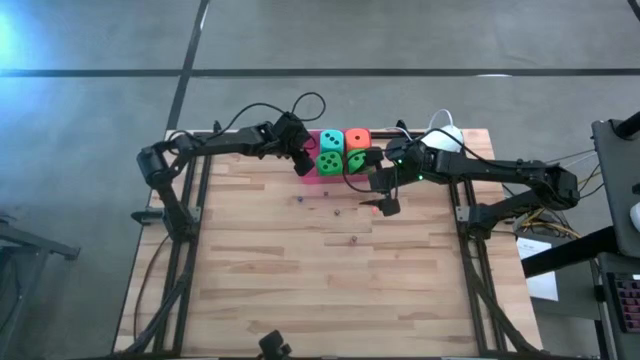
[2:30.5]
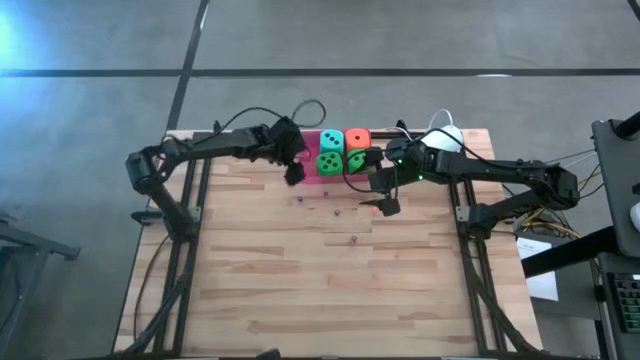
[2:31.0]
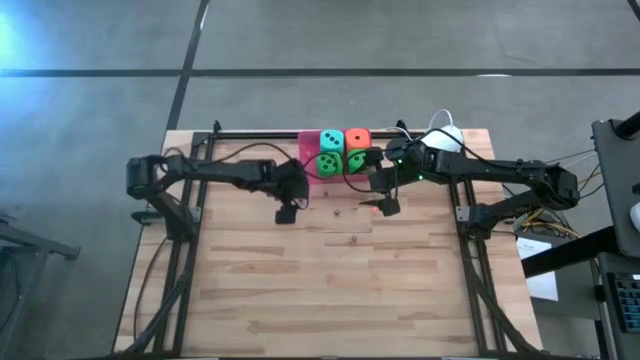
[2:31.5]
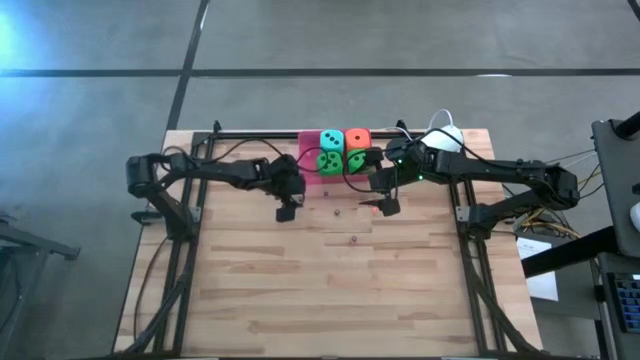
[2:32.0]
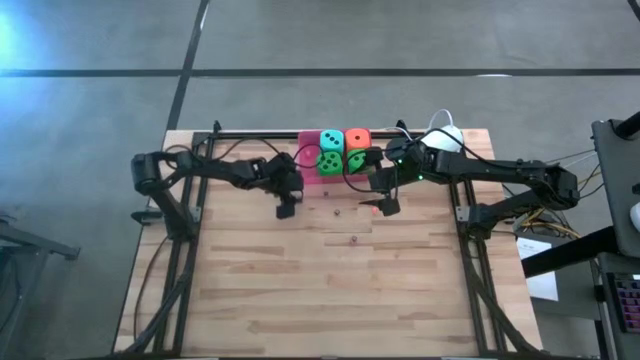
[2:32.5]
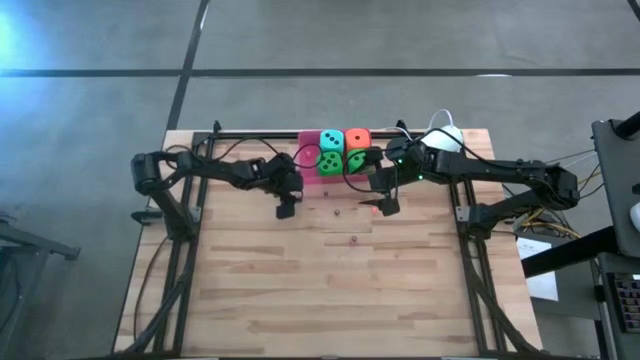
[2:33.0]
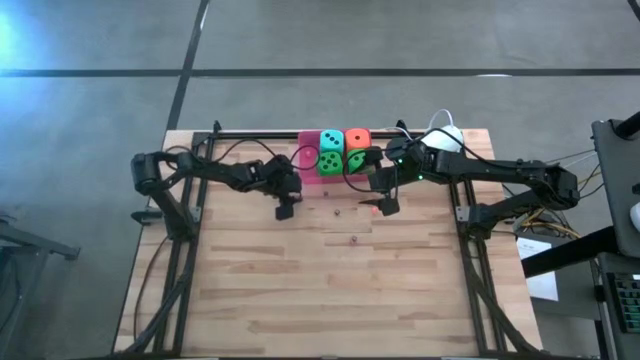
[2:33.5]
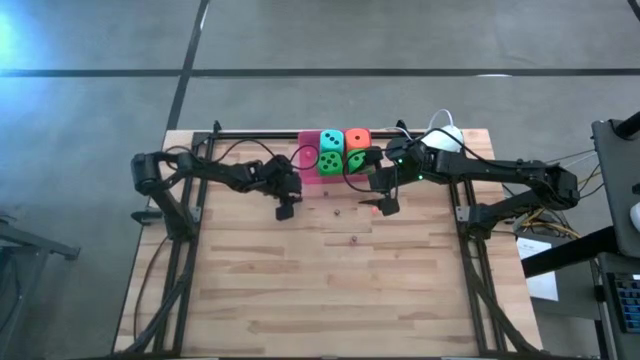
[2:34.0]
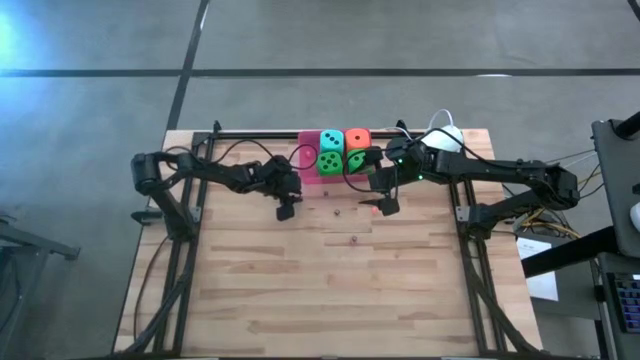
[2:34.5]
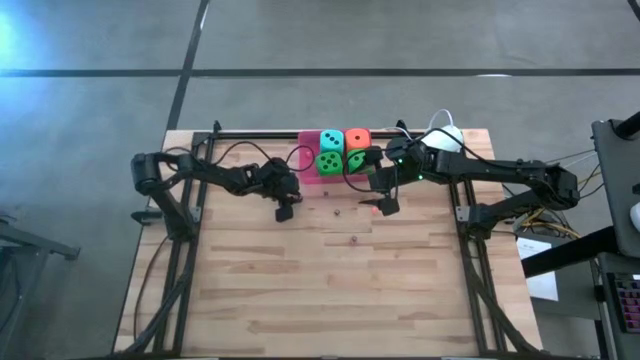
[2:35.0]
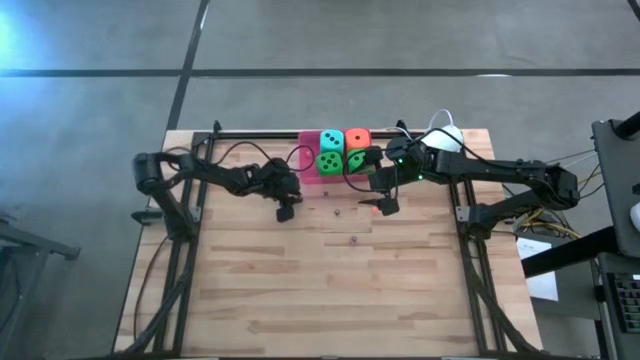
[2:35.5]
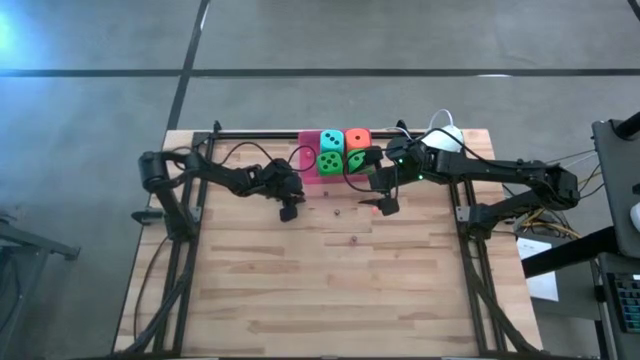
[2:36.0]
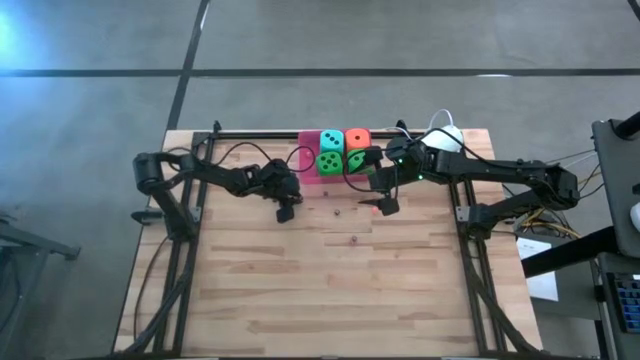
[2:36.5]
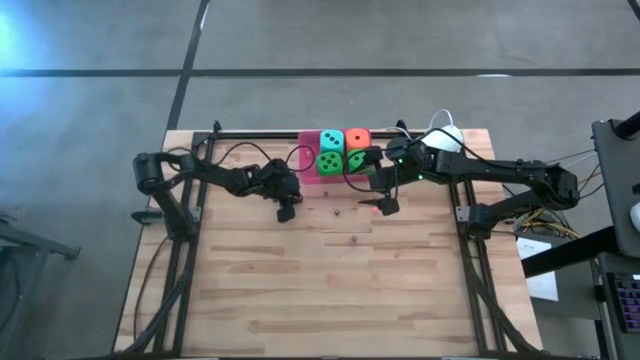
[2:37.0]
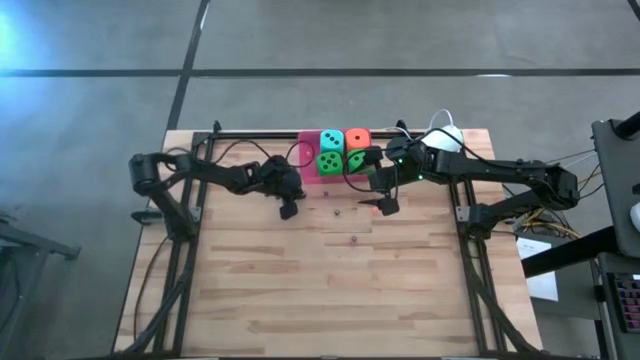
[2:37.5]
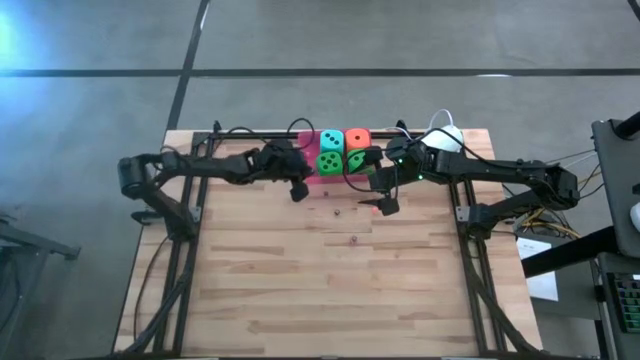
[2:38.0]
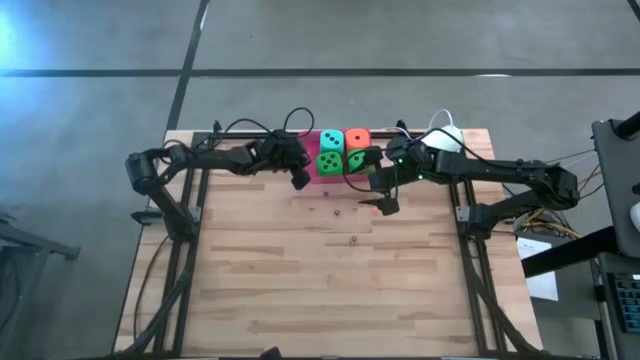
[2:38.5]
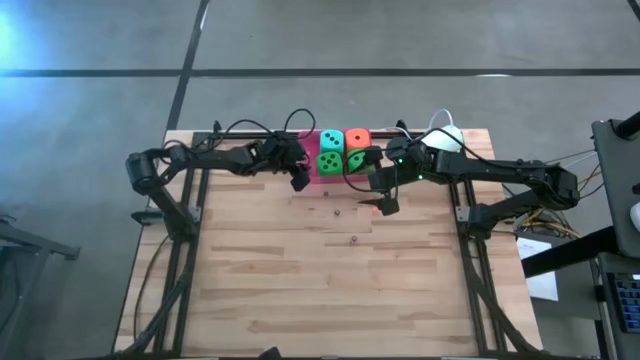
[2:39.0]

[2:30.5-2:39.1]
Task: Pick & Place Dice
Put the small blue dice into the the pink bin

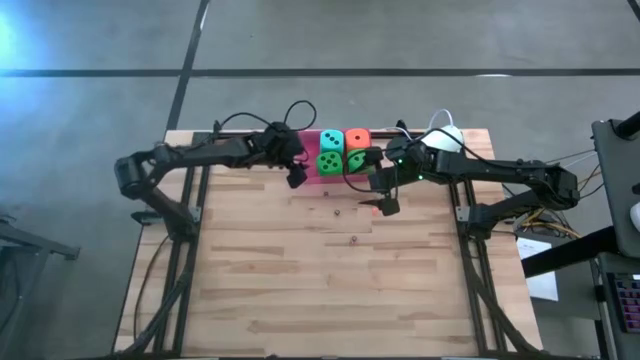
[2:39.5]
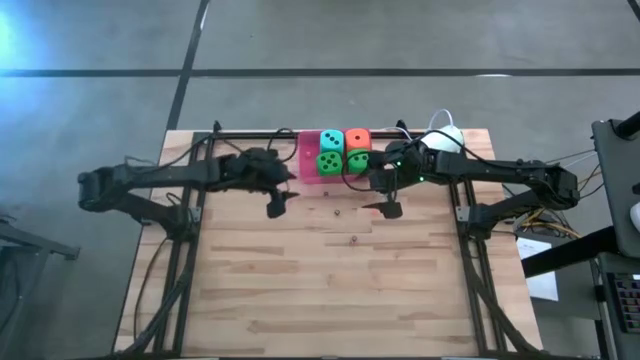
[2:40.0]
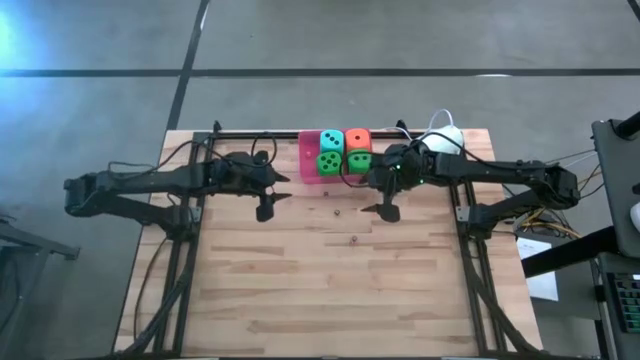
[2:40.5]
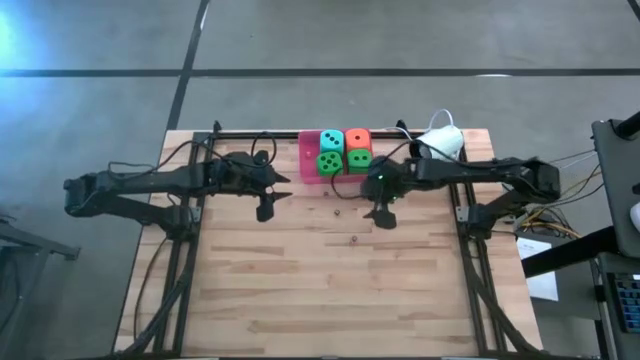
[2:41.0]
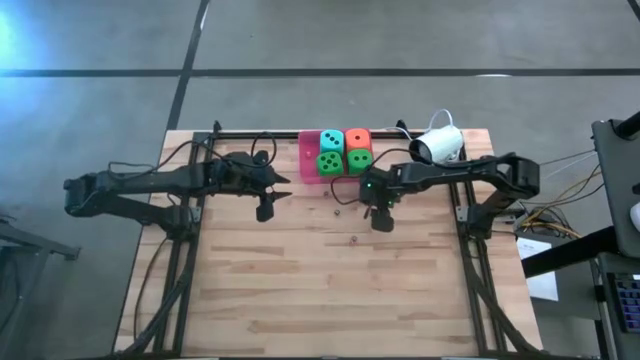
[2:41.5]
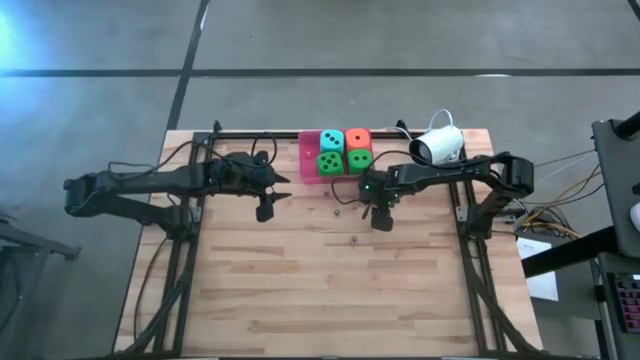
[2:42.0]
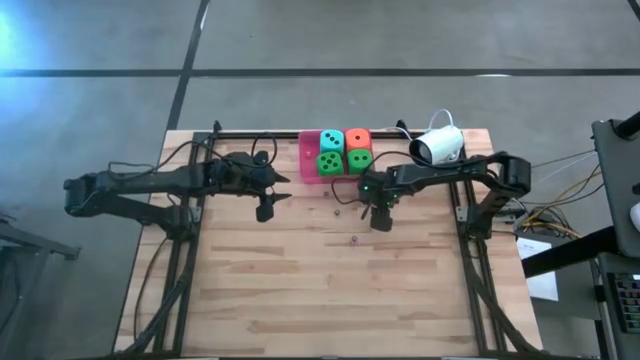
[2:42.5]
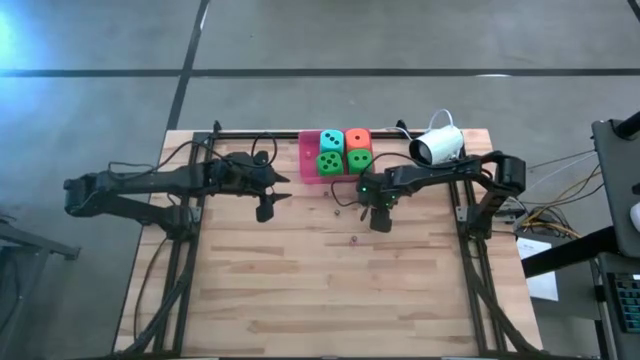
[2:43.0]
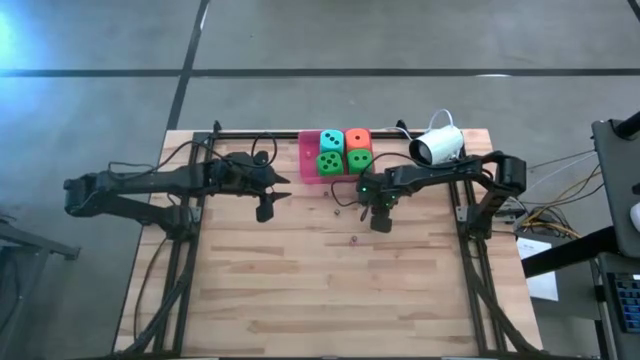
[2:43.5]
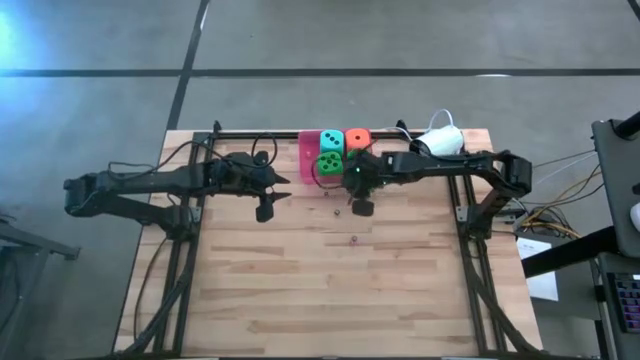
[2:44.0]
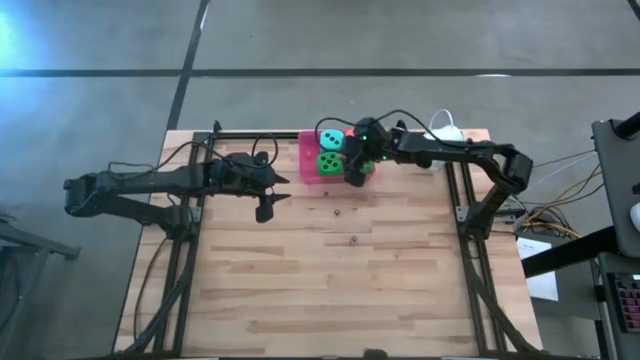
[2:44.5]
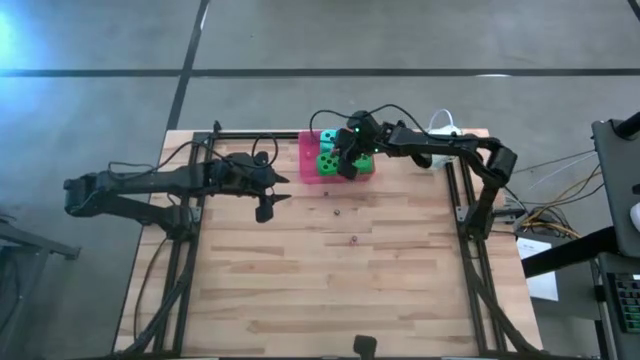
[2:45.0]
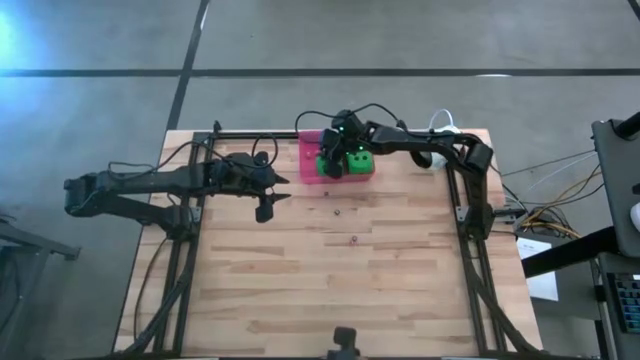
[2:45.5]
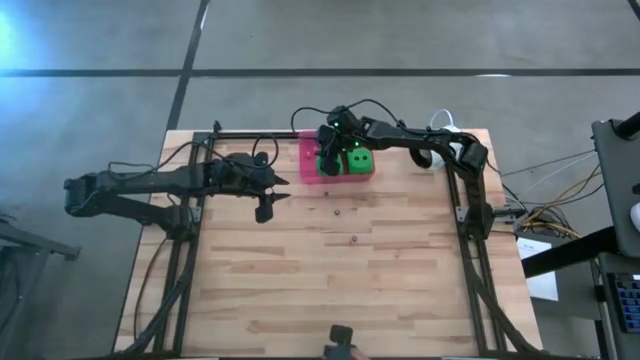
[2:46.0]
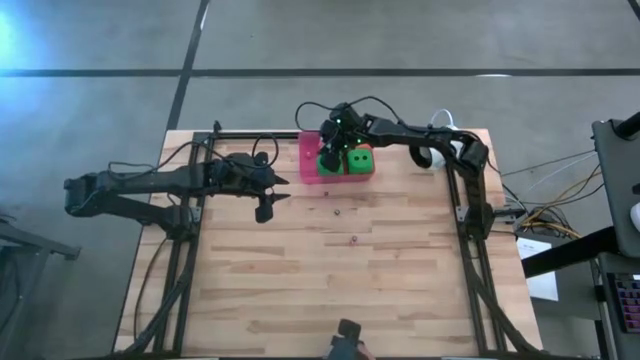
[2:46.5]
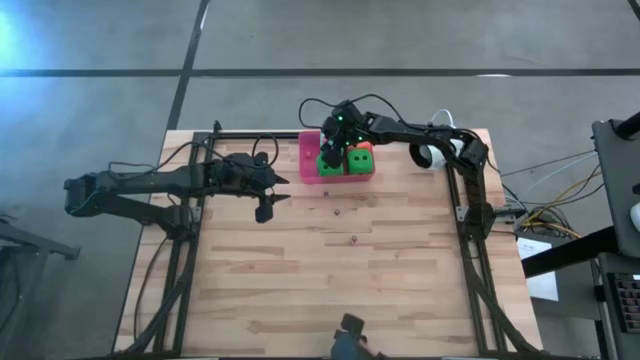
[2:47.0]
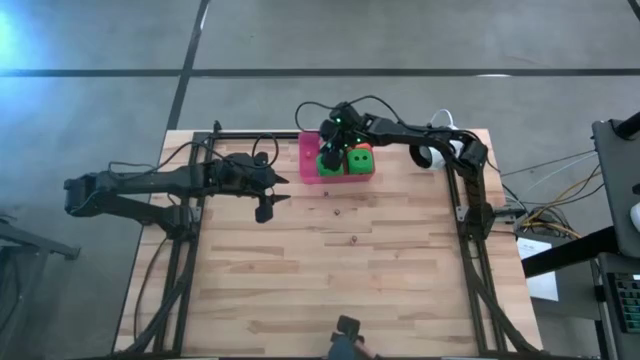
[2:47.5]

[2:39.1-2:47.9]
Put the small orange dice into the the pink bin

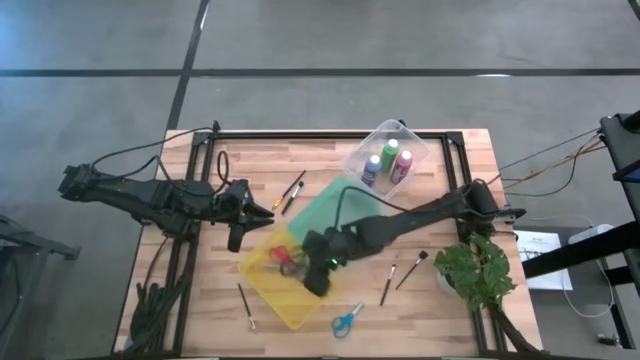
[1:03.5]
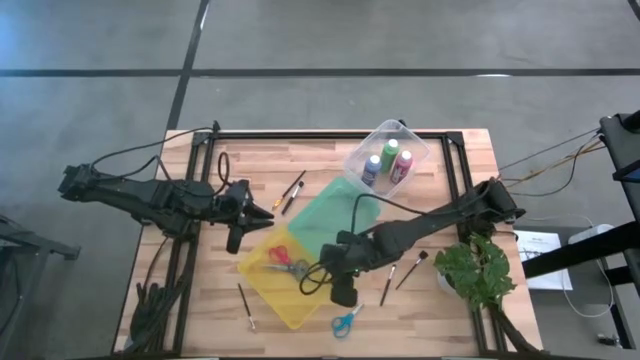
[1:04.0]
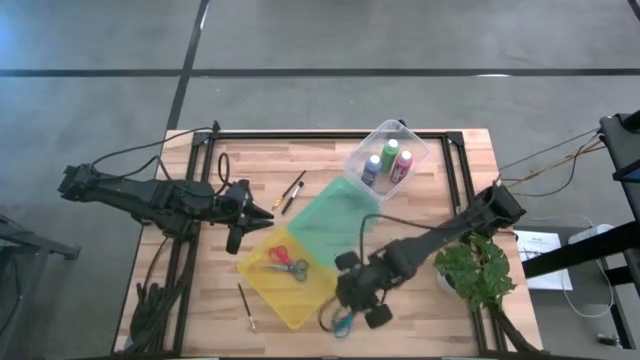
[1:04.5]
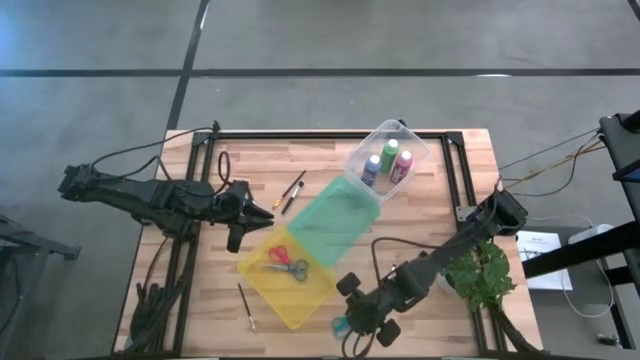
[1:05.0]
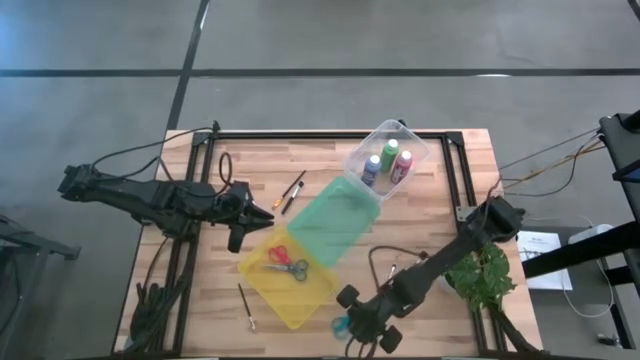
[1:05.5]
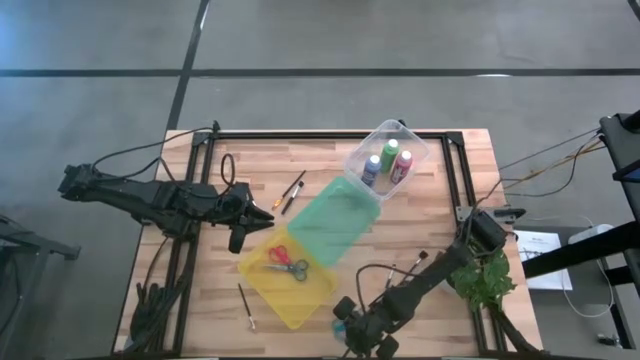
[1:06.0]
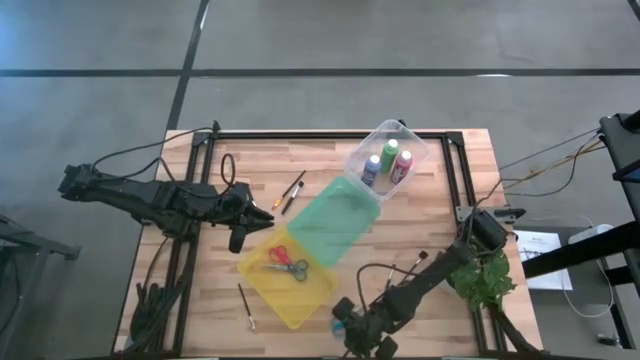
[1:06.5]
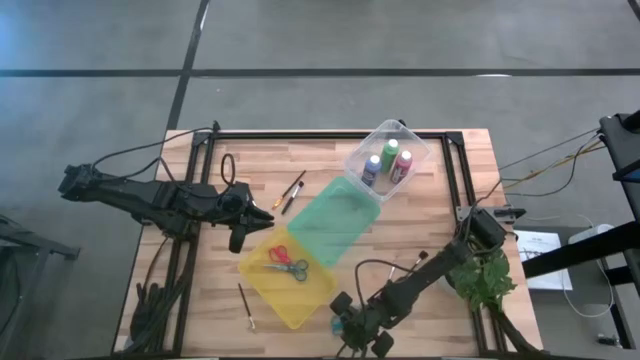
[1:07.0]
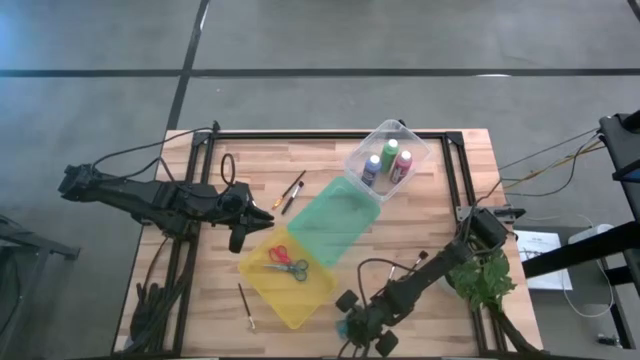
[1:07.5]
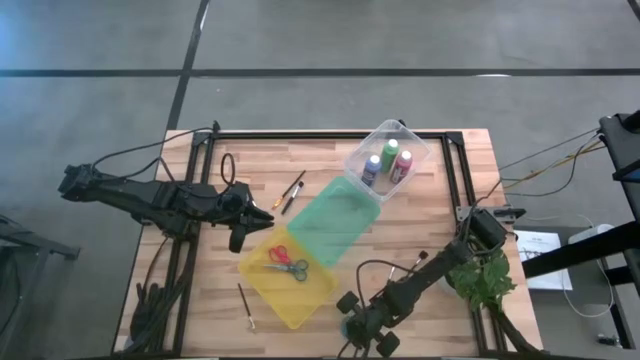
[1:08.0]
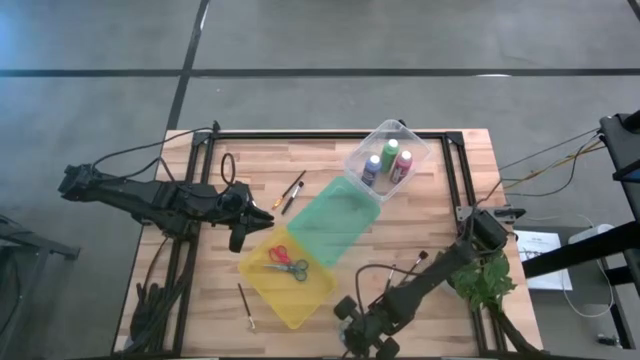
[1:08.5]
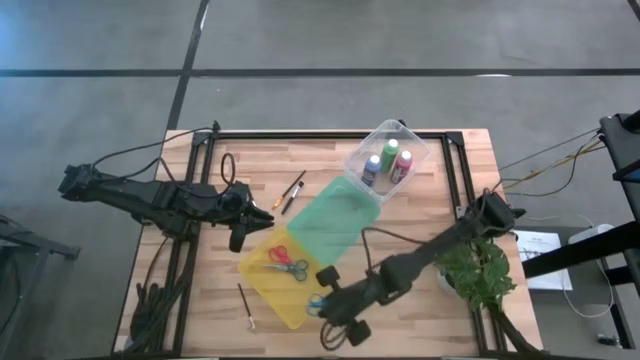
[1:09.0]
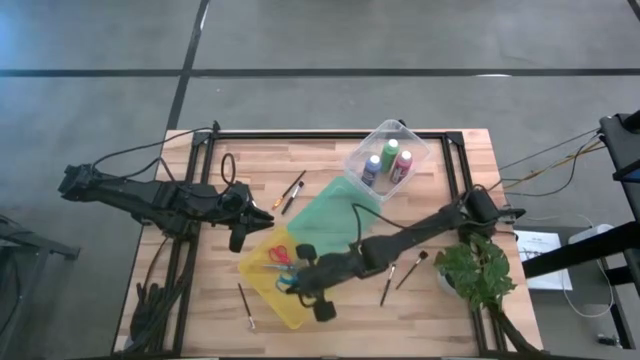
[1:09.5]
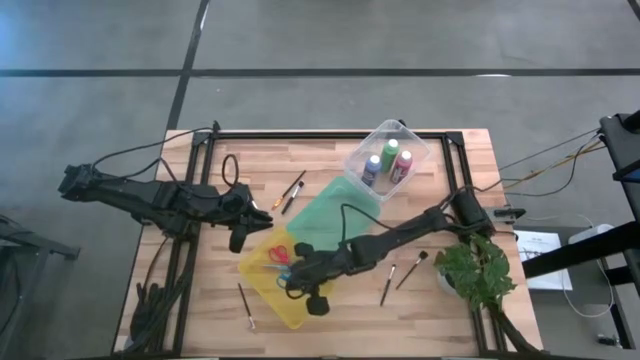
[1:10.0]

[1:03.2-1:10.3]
Task: Pick & Place Paint Supplies
Put the blue scissors into the yellow bin
